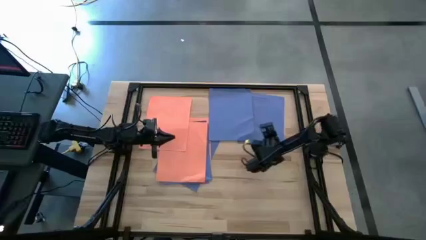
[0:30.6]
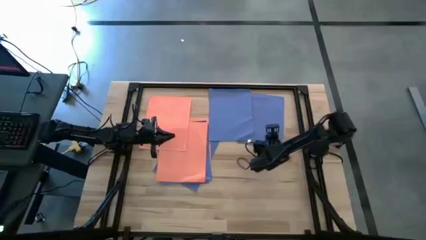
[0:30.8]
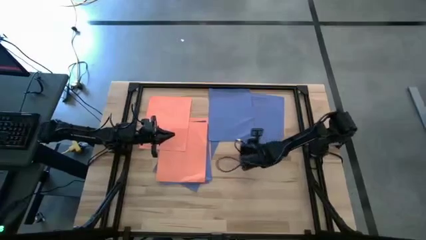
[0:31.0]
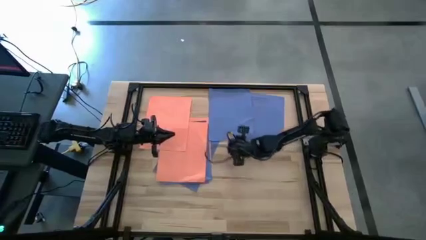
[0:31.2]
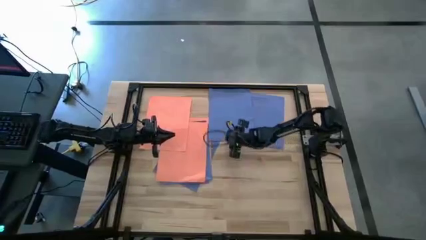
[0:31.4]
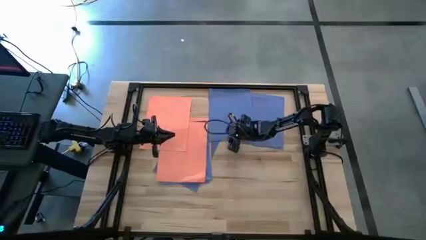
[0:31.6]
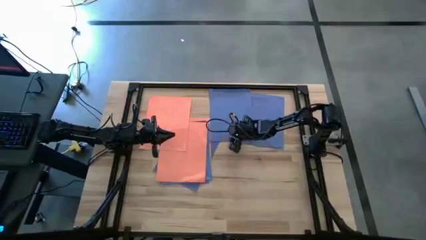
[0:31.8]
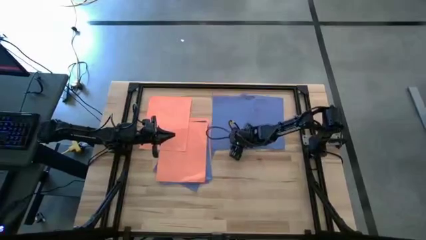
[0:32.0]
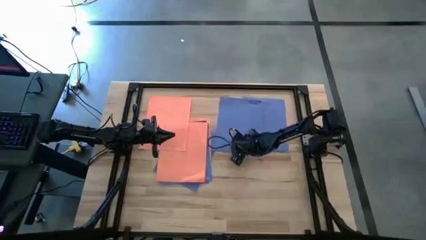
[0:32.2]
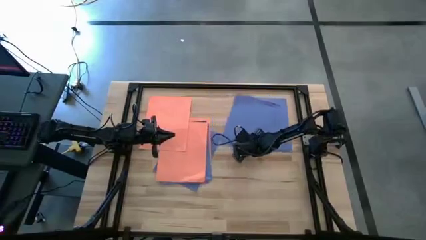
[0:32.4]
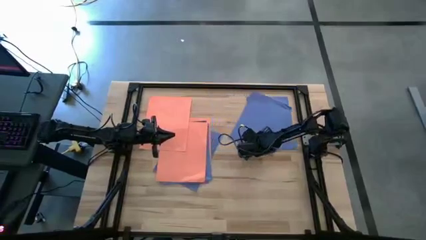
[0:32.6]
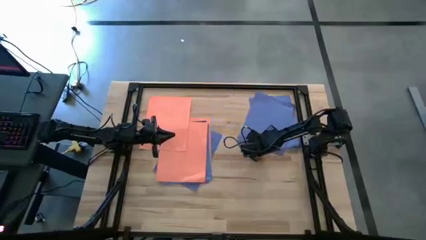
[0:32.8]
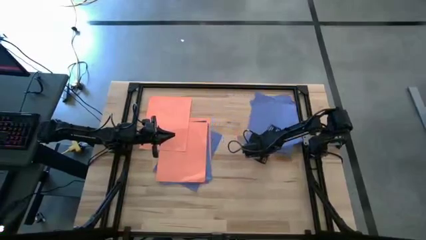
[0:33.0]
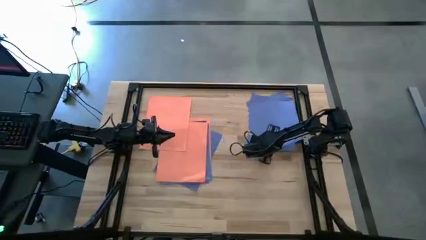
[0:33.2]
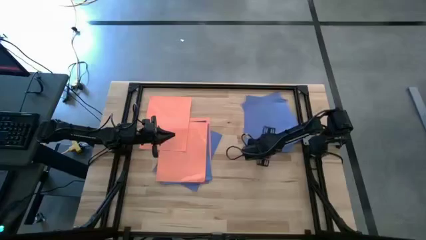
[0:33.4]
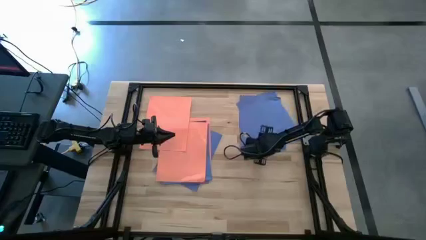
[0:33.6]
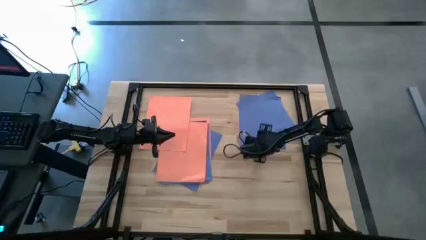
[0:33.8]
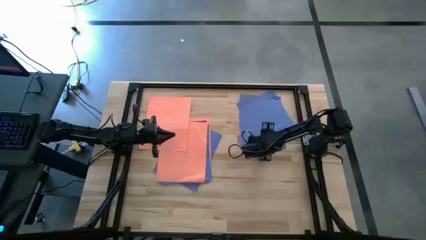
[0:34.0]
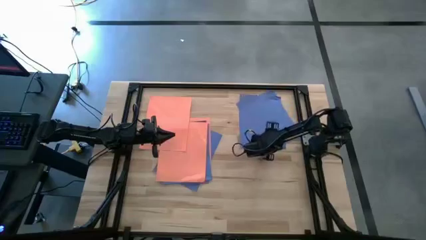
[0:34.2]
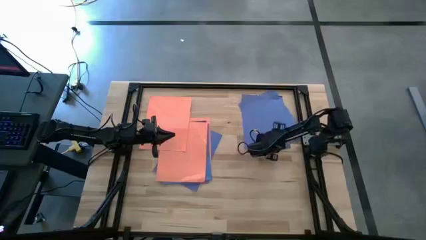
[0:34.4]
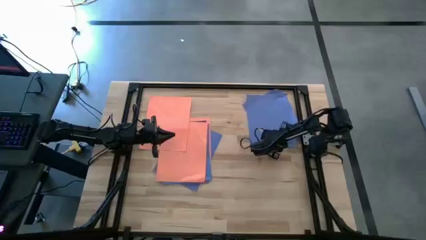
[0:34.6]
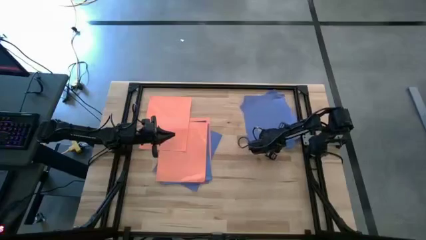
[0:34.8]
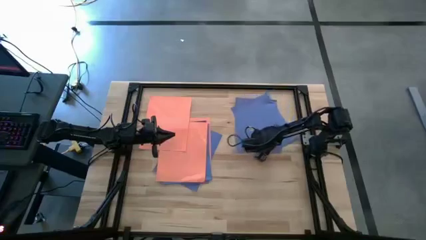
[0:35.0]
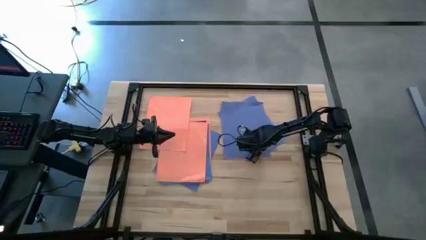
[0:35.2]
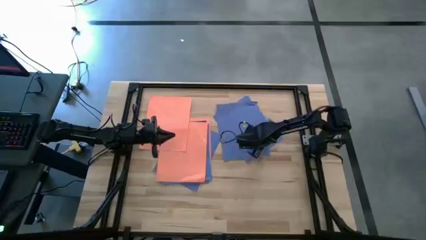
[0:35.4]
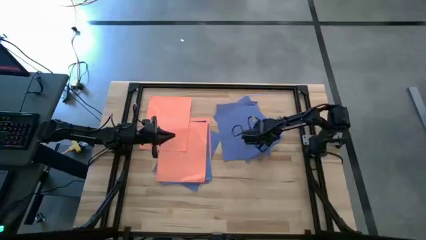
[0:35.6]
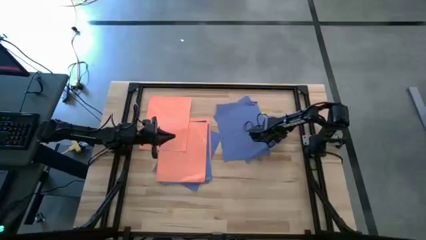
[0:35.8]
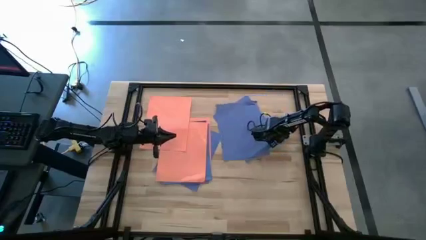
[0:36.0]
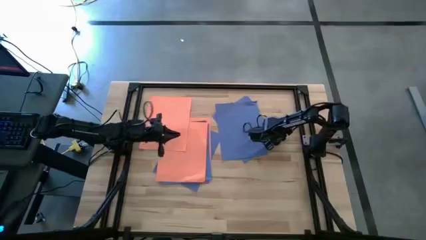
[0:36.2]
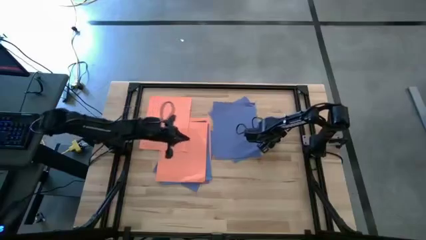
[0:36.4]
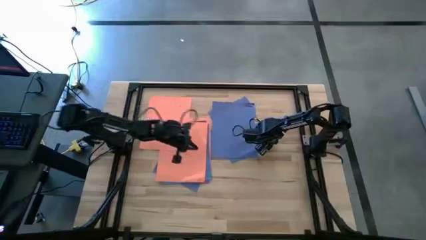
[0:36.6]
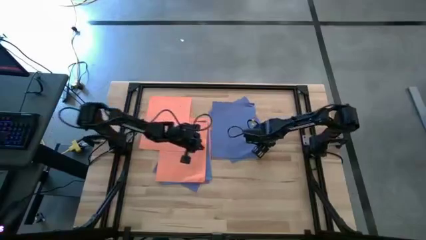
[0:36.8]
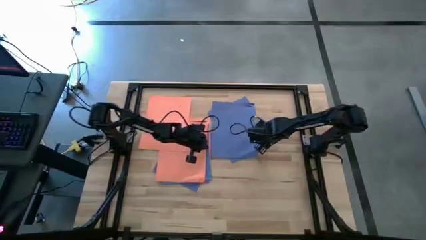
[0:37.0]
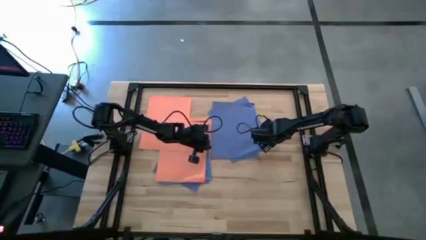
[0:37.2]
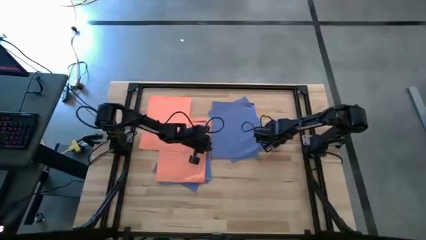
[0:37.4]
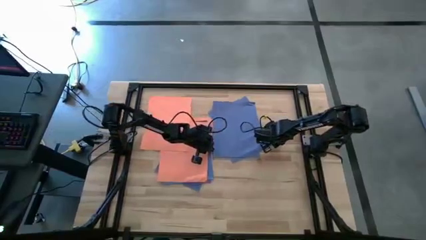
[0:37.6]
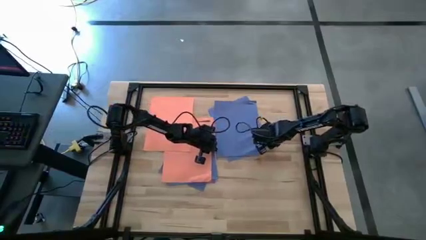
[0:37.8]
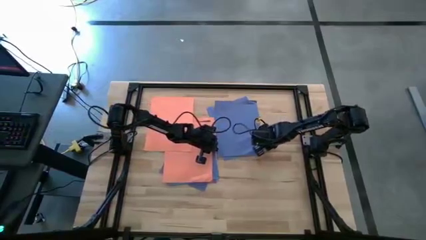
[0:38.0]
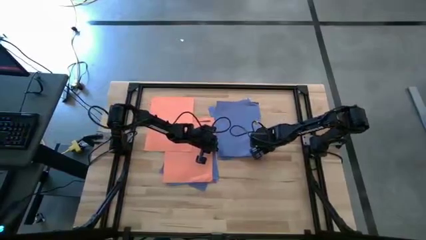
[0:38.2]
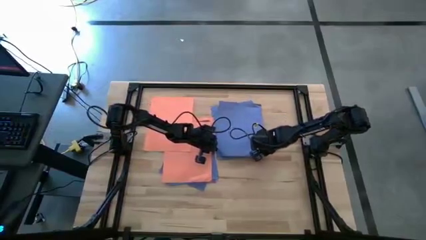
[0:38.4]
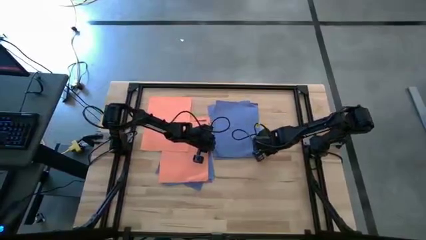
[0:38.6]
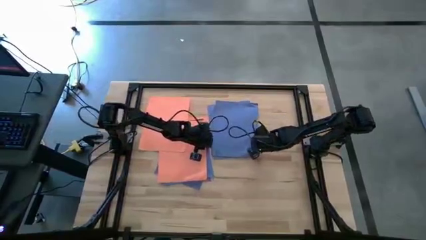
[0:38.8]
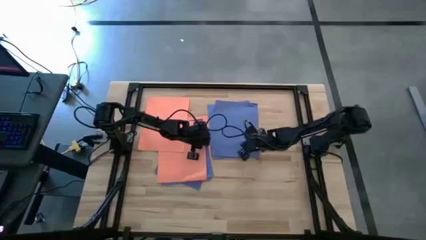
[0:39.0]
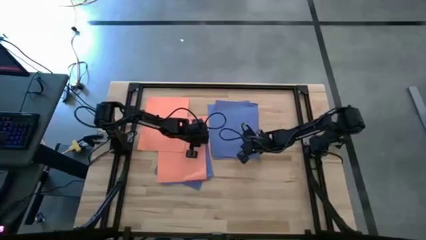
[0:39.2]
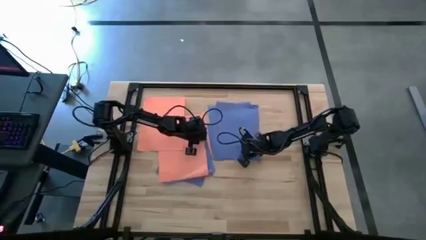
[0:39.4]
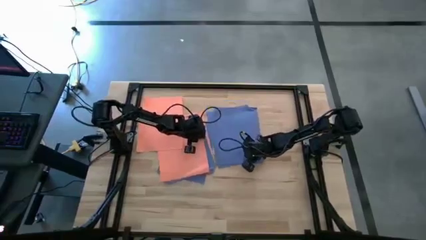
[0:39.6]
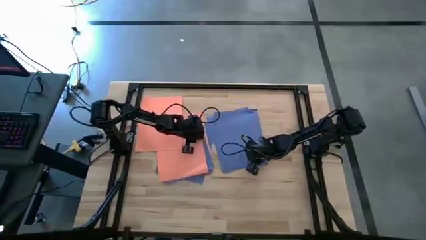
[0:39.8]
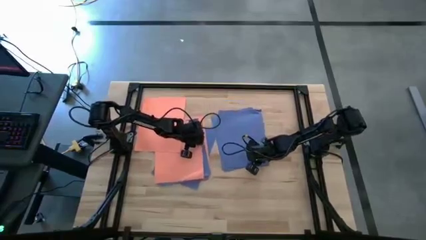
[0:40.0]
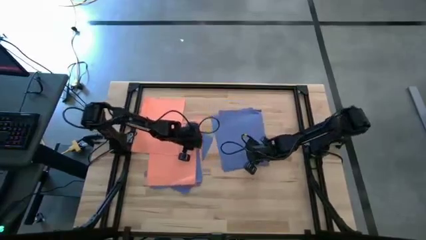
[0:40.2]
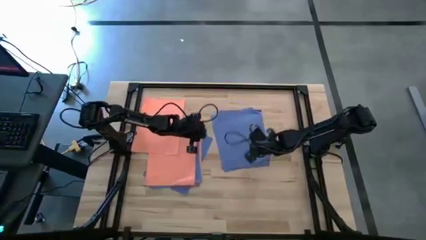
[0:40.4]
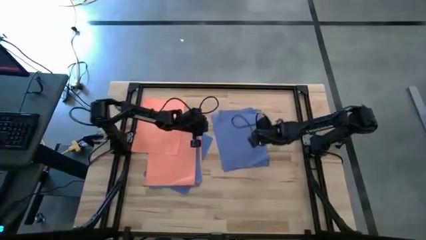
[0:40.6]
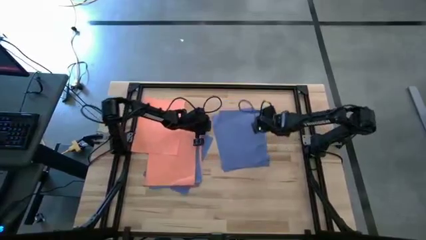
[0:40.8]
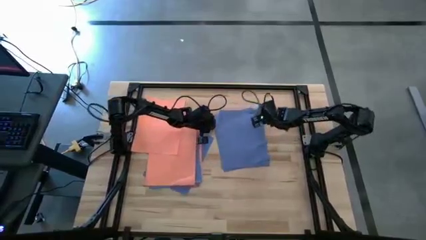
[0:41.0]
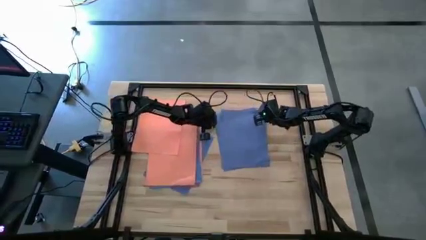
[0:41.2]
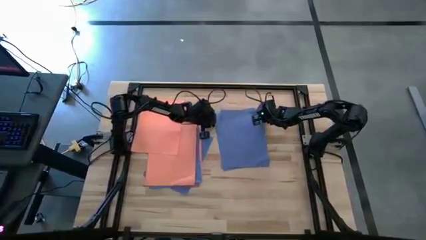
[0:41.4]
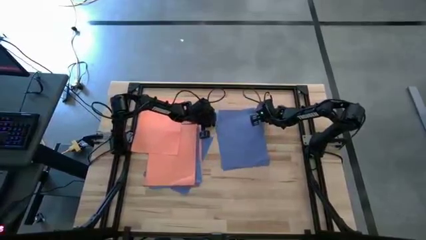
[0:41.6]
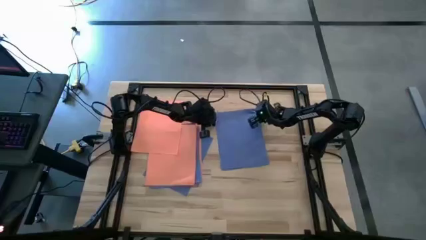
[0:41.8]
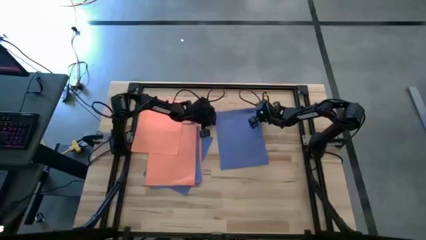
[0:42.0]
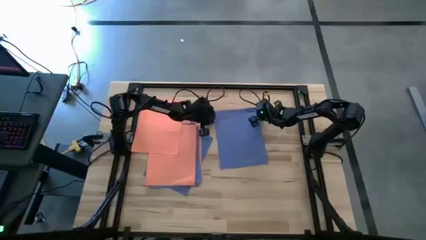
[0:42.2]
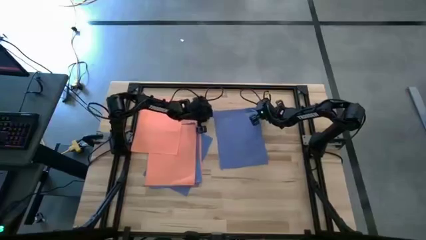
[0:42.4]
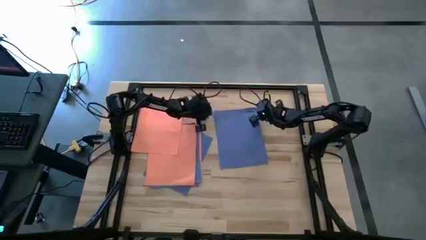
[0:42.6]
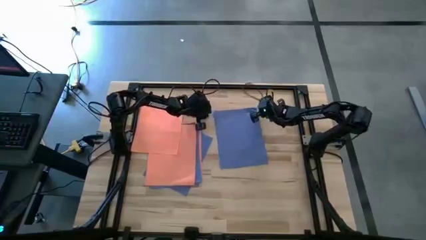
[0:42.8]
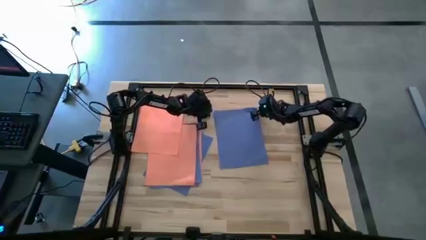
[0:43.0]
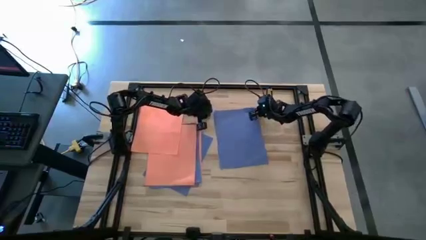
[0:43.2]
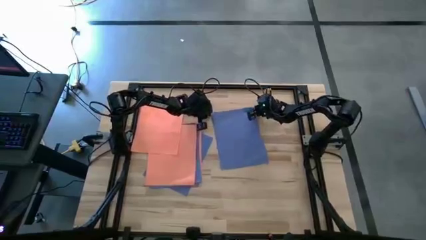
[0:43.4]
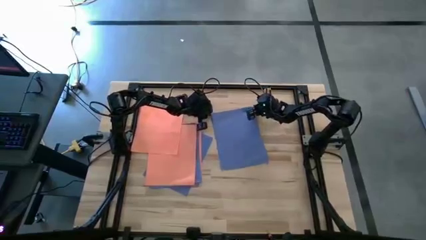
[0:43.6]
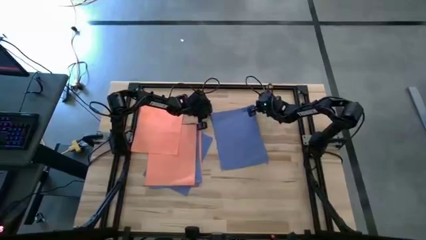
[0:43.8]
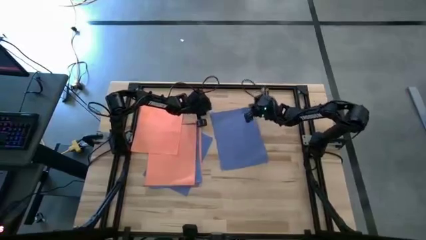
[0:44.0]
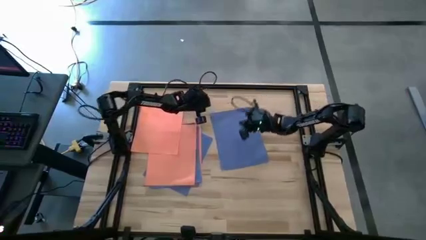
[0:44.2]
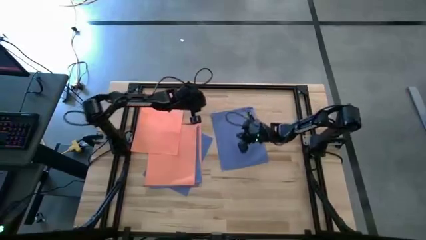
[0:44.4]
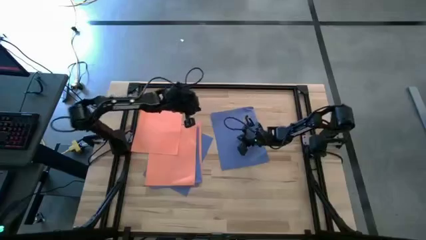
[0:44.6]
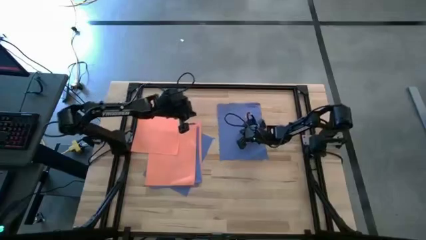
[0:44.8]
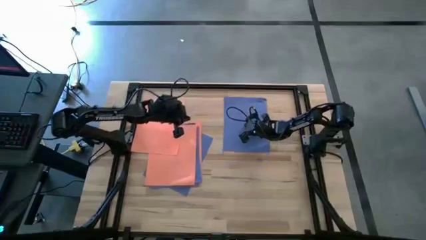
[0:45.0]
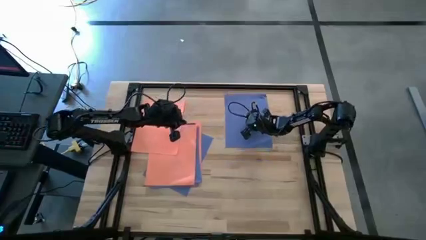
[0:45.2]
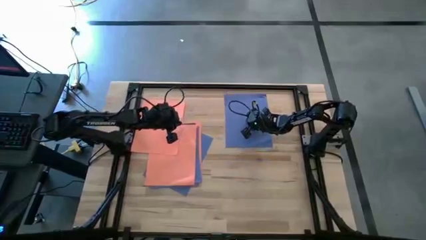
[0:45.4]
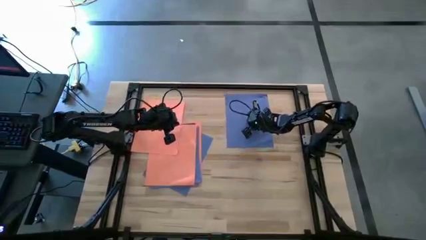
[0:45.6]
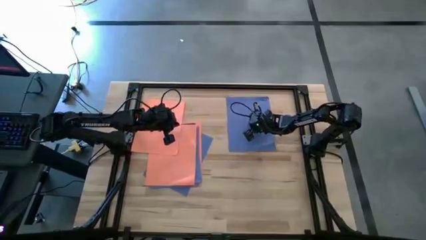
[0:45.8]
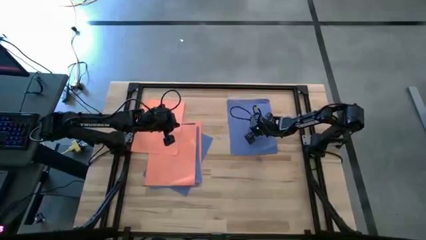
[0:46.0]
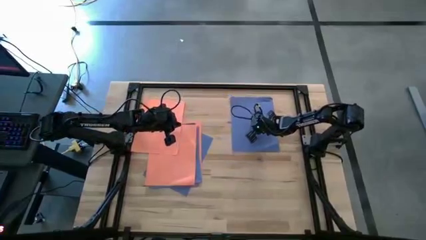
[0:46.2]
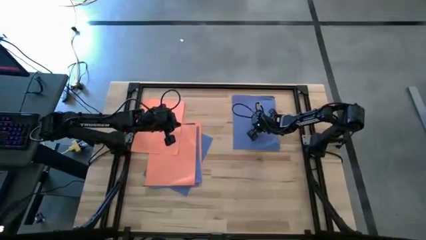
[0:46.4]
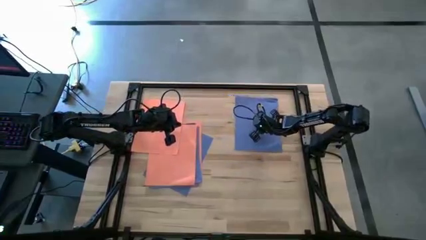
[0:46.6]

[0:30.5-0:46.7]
Task: Organize paper
Stack the blue paper on top of the blue paper
